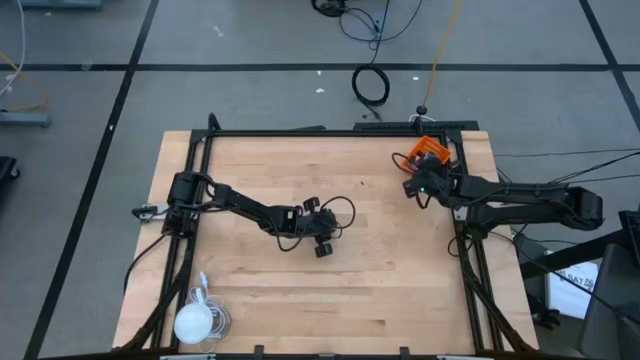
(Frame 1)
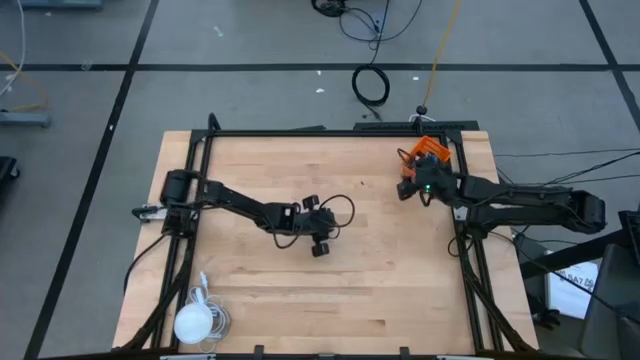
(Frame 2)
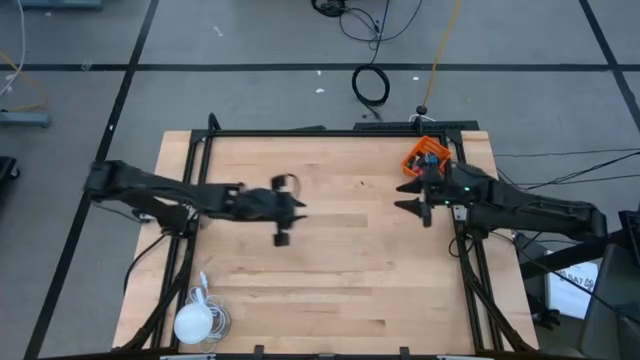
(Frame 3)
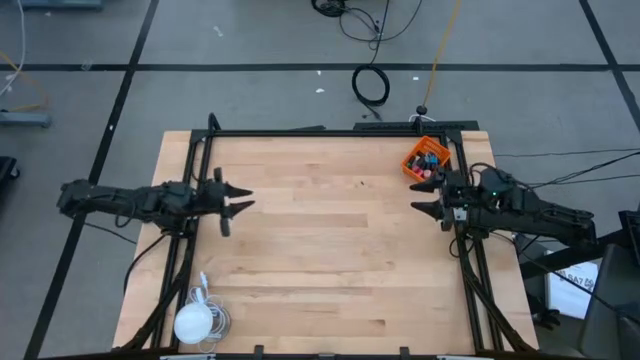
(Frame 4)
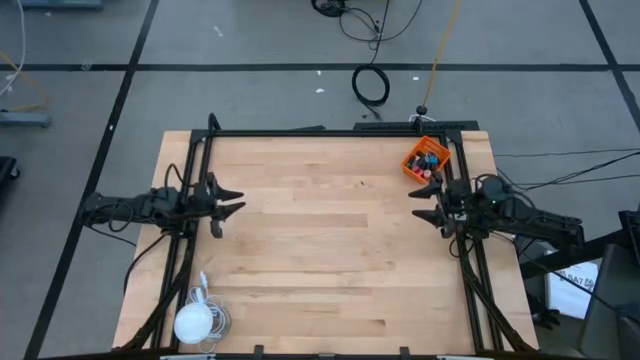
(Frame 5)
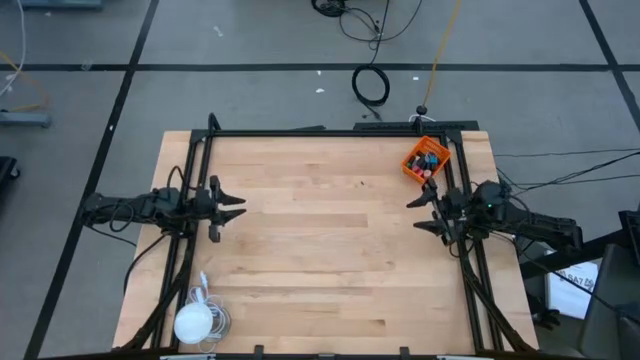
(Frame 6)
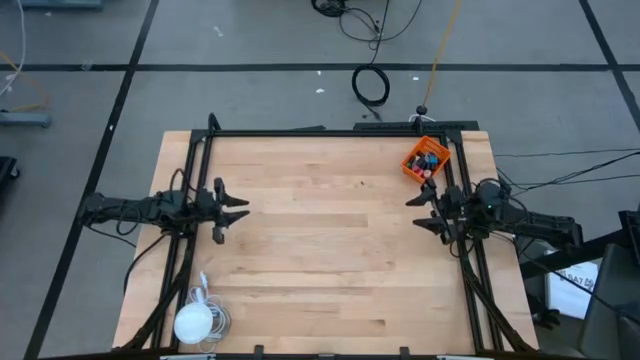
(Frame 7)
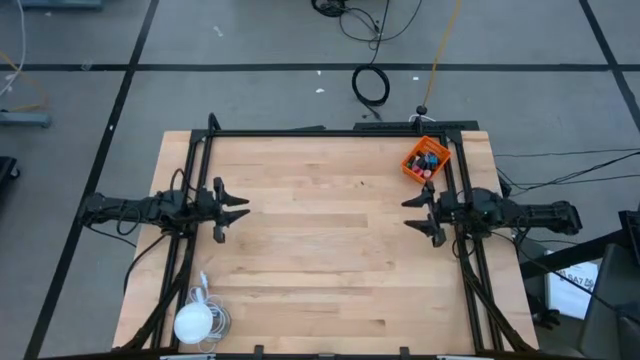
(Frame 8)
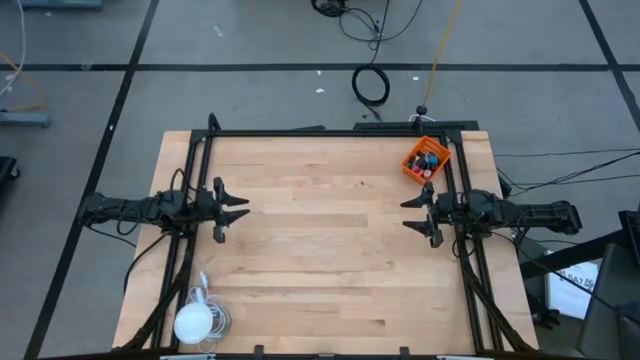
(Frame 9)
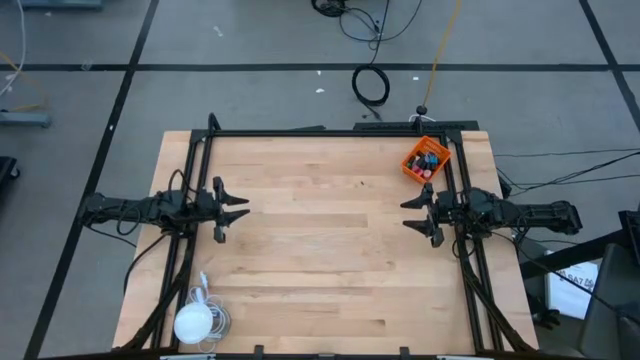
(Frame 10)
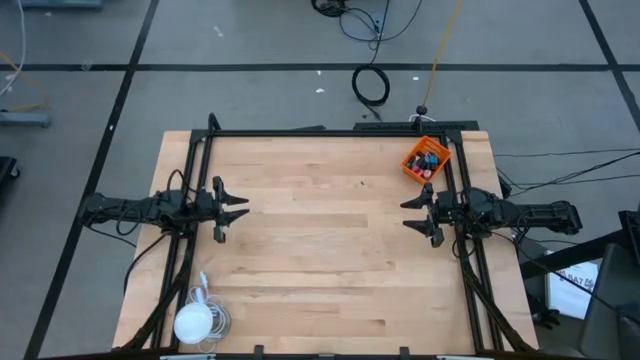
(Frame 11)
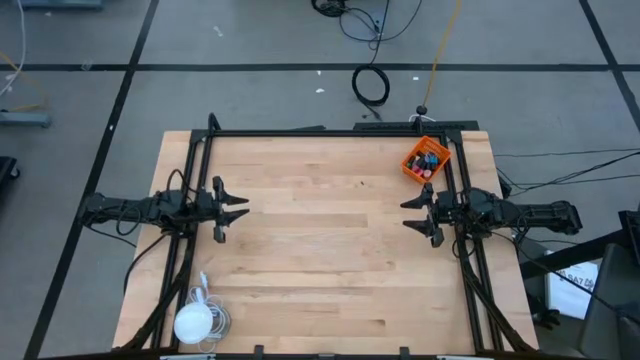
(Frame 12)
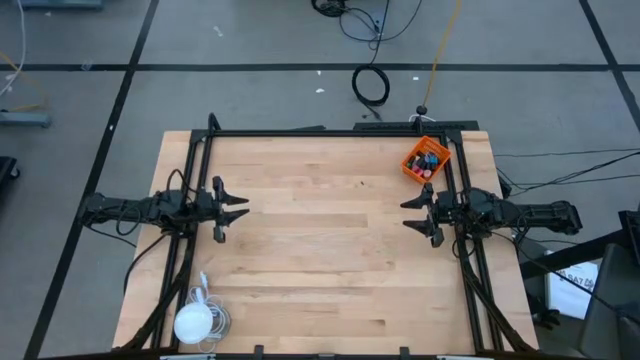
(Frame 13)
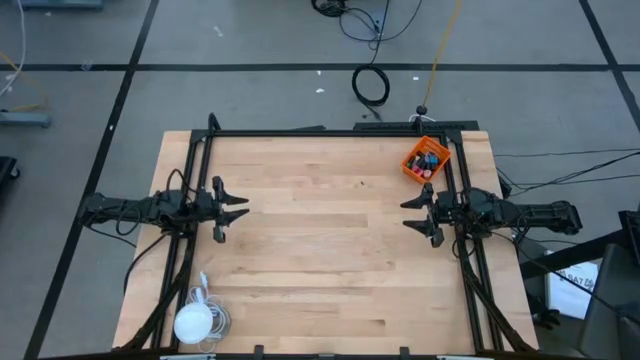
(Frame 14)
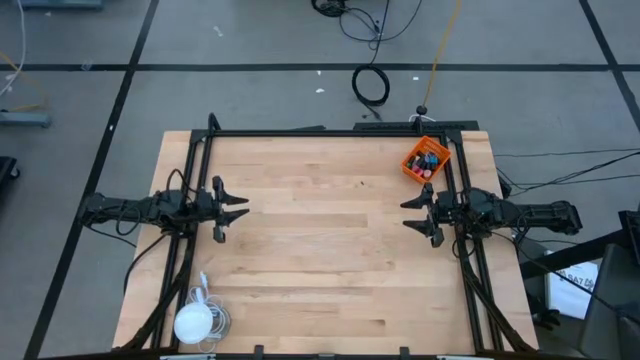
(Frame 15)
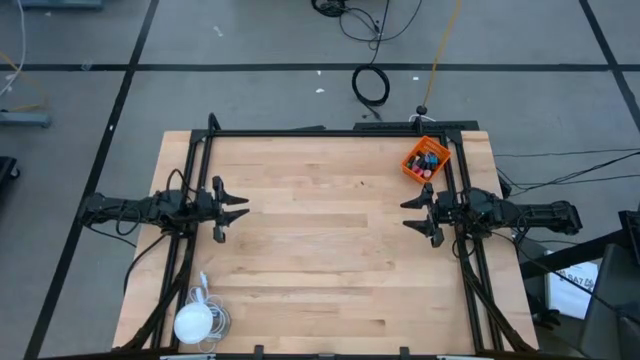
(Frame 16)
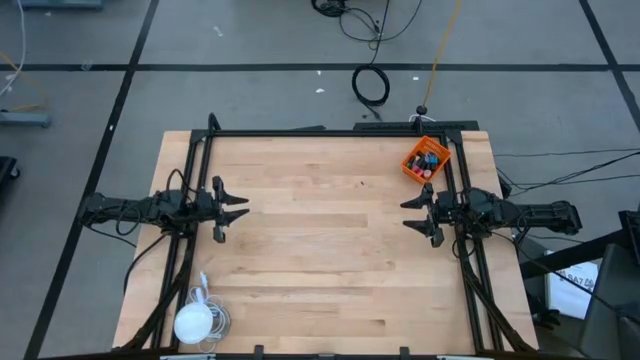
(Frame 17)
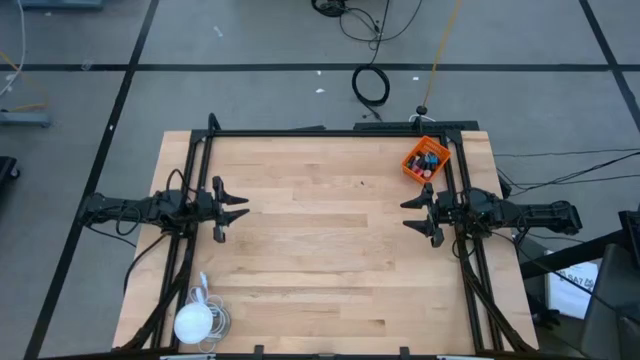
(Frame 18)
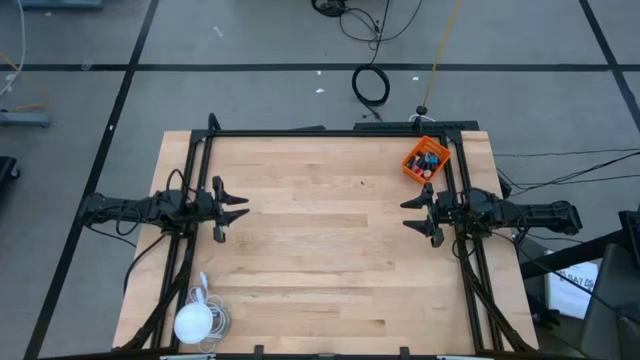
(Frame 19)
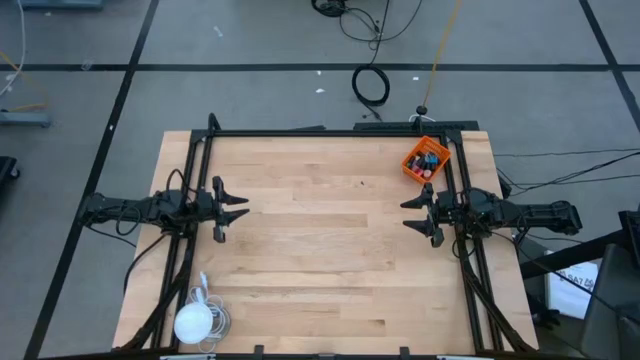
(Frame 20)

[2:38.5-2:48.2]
Task: Pick & Place Nail Polish
Return to Home Position

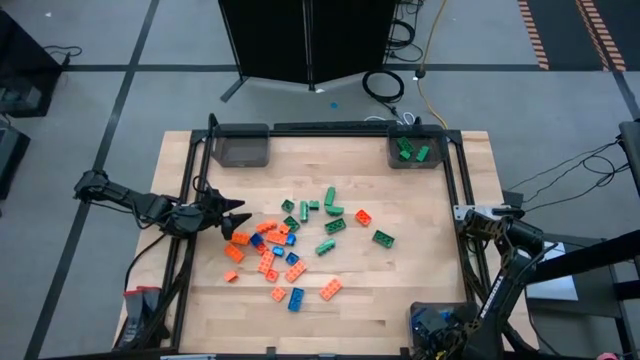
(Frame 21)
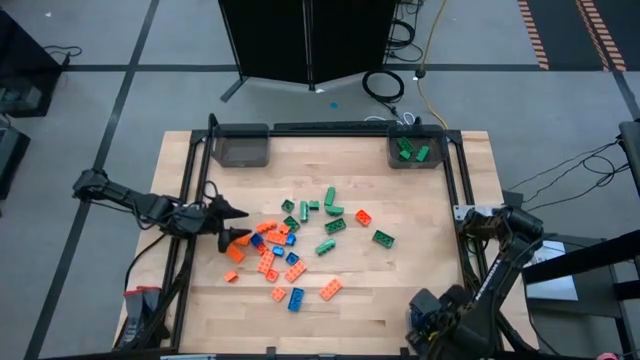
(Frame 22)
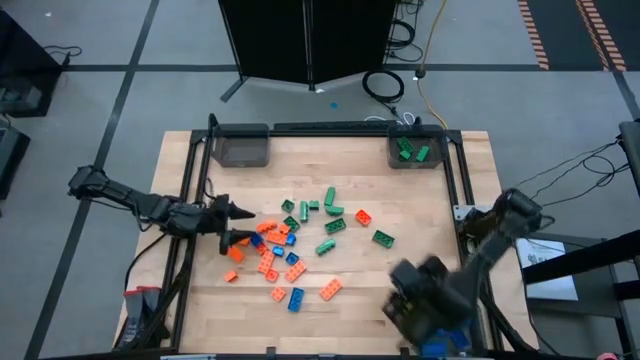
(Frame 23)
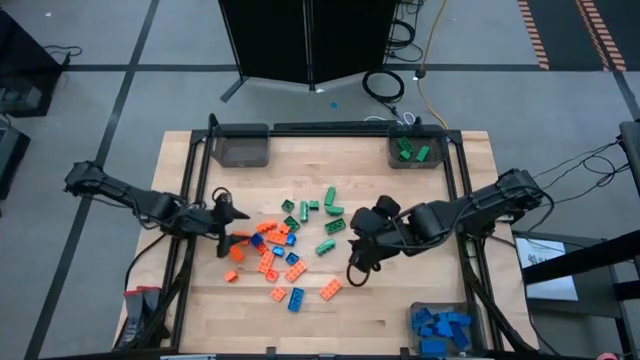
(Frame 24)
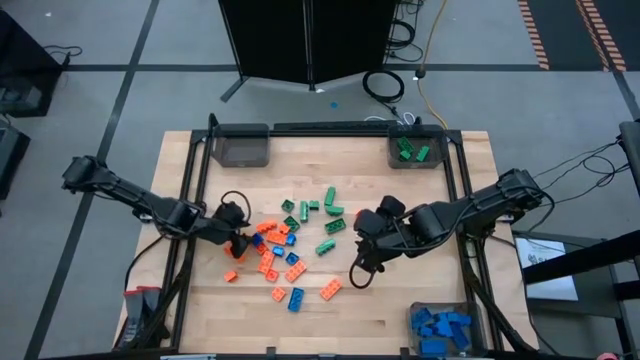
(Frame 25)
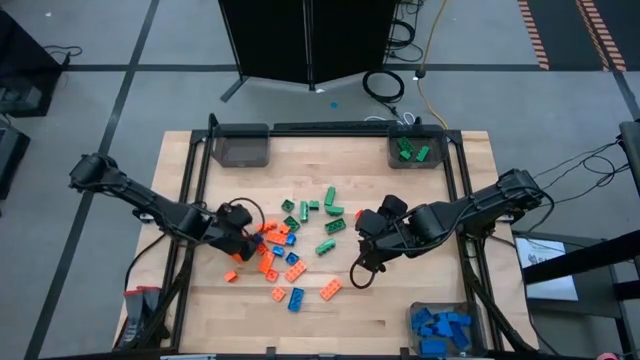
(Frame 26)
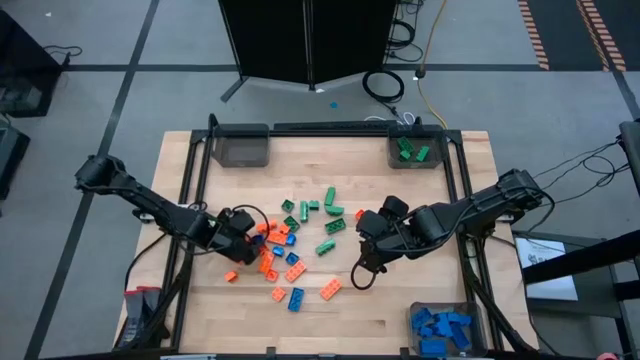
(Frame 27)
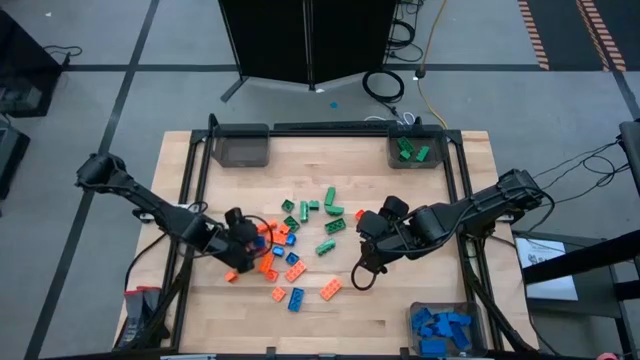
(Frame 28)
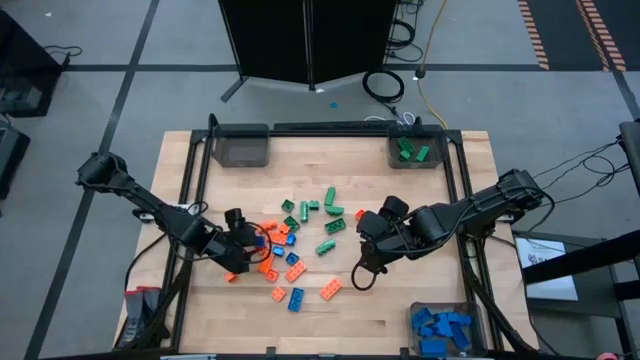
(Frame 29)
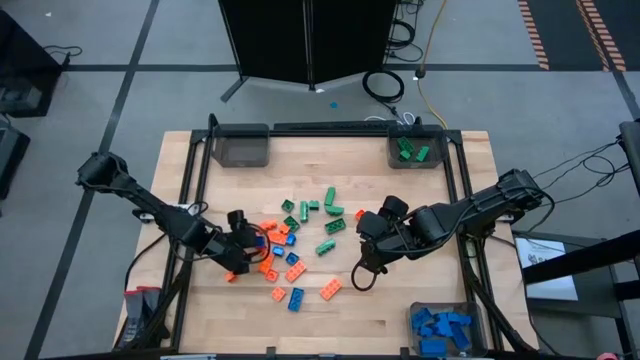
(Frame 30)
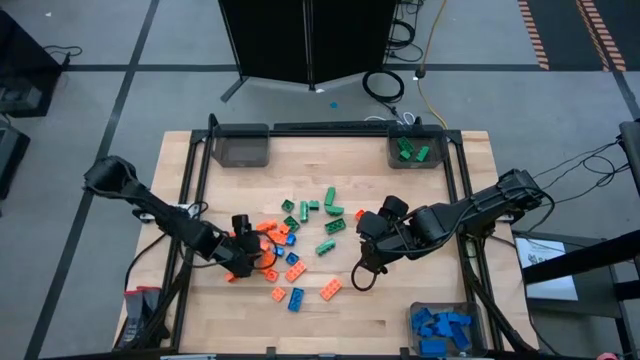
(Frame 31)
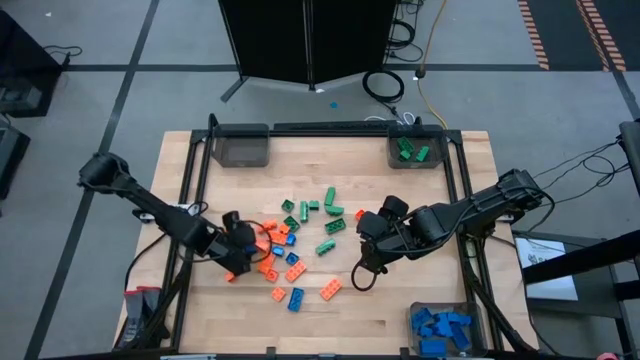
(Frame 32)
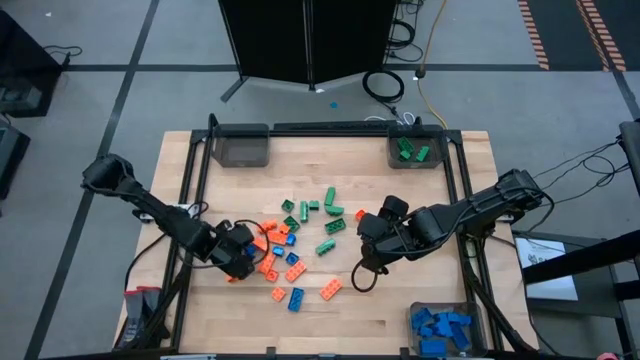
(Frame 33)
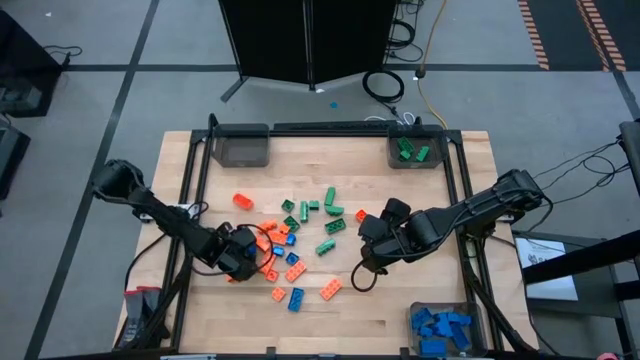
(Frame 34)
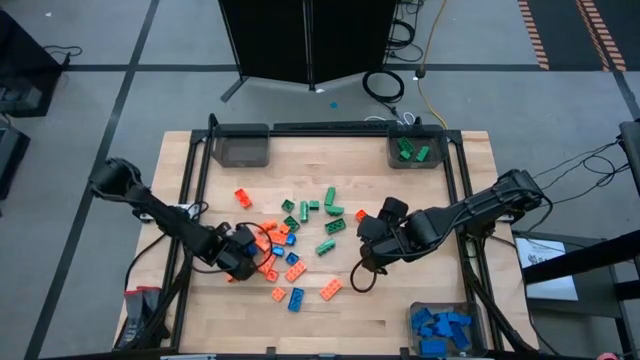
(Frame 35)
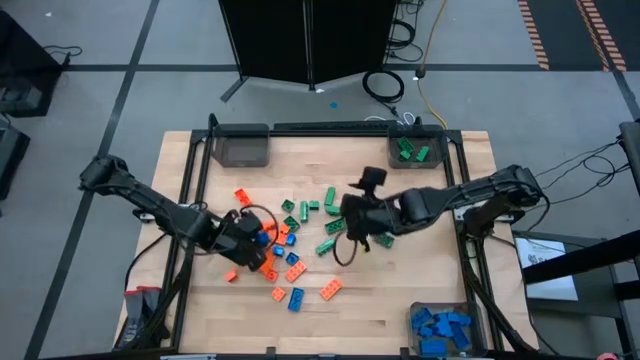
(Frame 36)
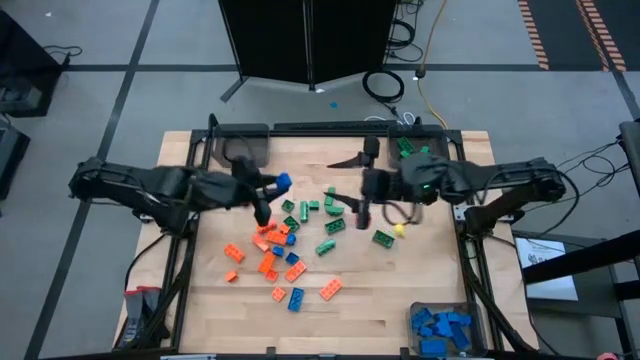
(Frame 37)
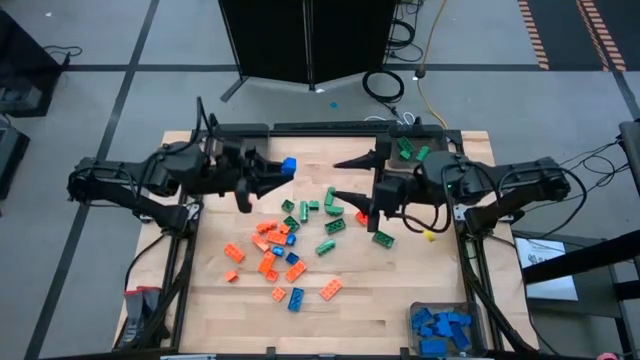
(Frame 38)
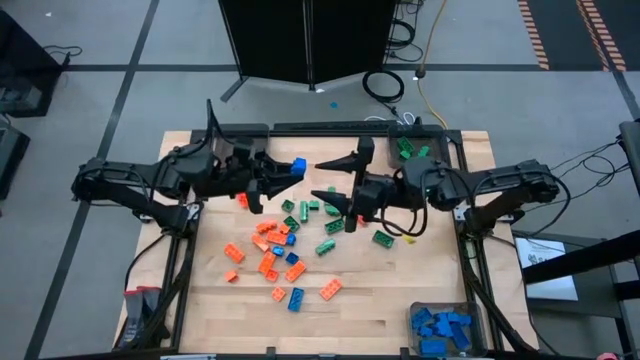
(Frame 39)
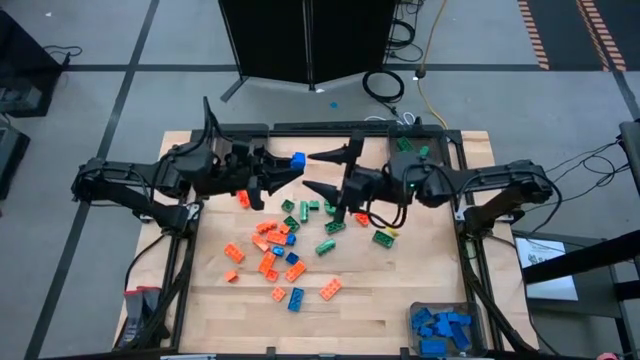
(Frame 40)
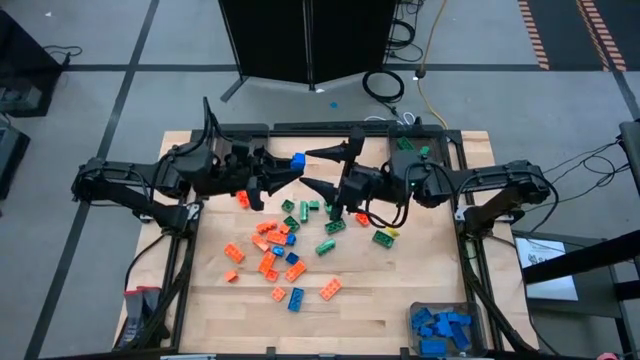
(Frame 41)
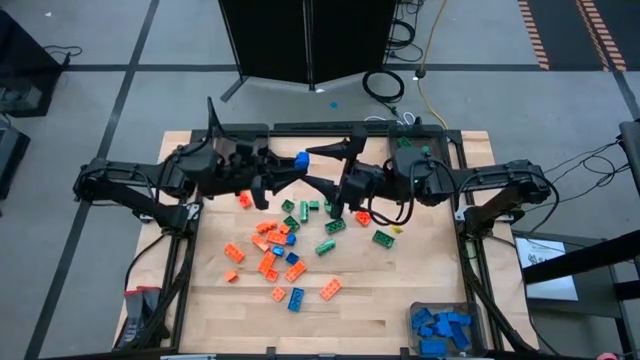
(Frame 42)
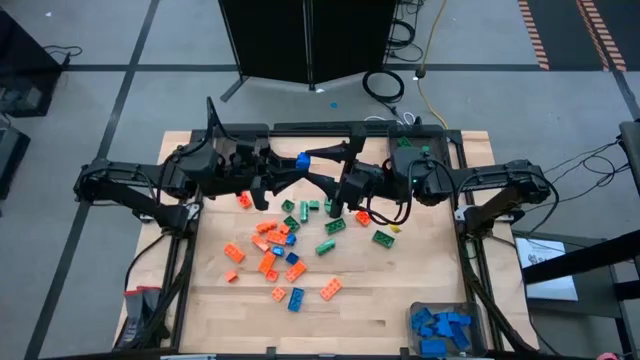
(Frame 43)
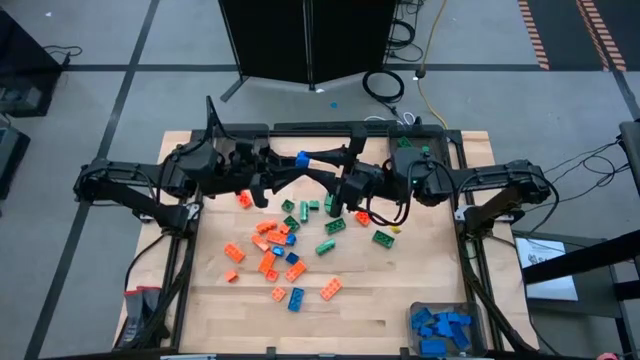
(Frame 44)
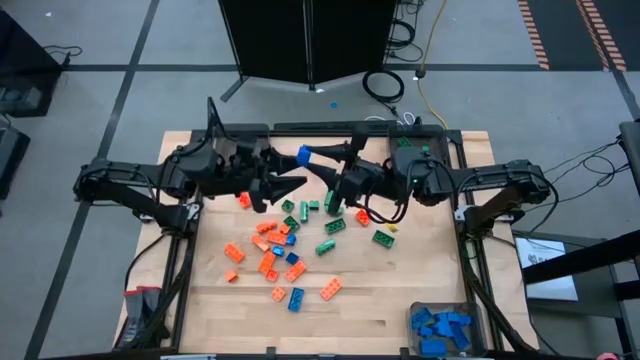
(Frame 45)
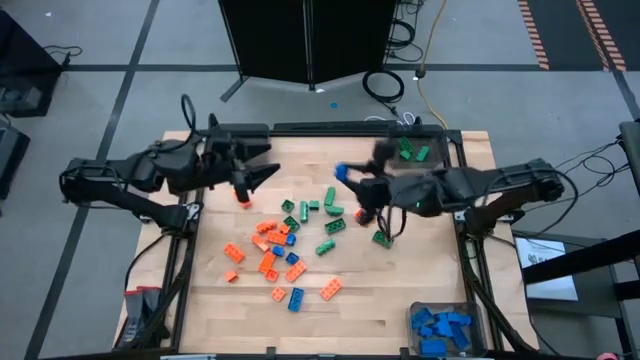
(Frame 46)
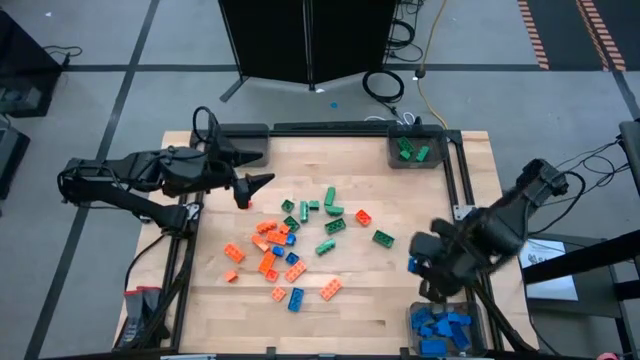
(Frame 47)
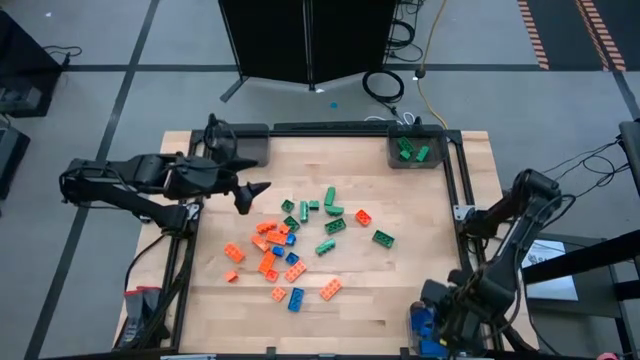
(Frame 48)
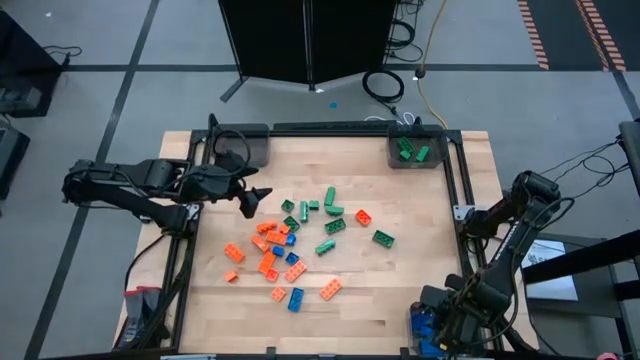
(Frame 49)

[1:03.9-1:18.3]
Task: Sort blocks
Put the blue game piece into the bottom black bin
